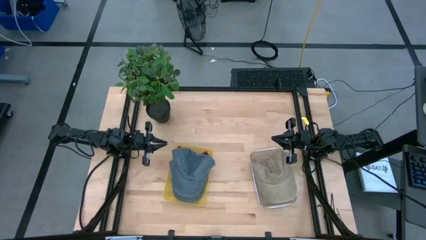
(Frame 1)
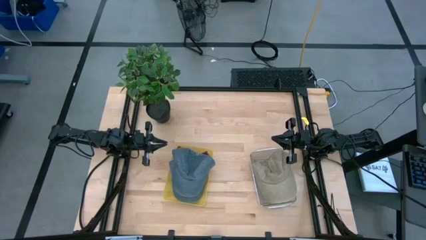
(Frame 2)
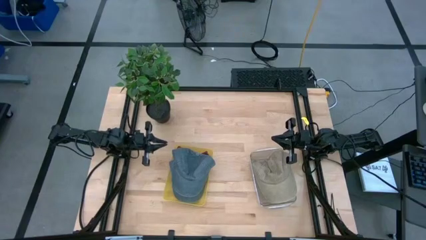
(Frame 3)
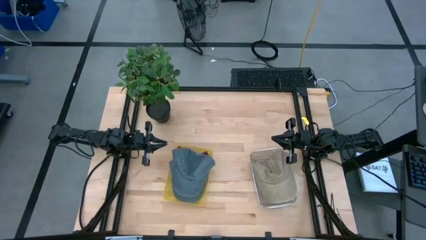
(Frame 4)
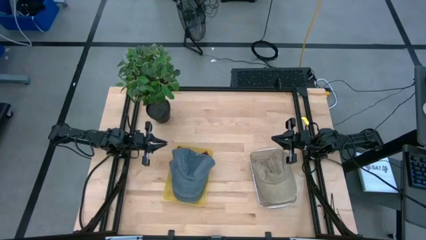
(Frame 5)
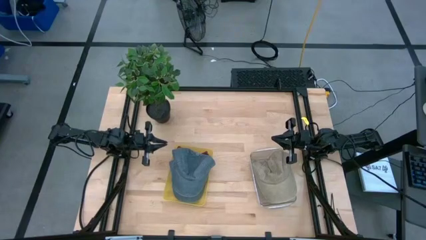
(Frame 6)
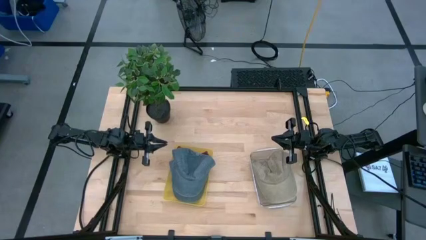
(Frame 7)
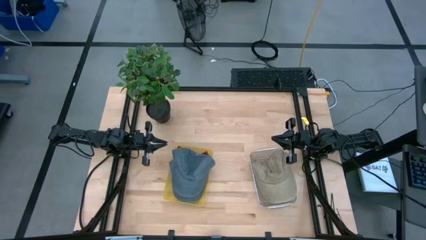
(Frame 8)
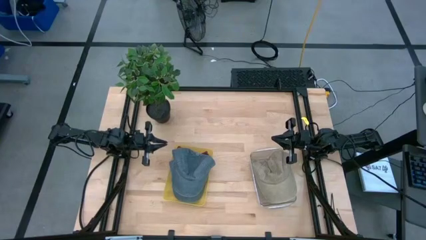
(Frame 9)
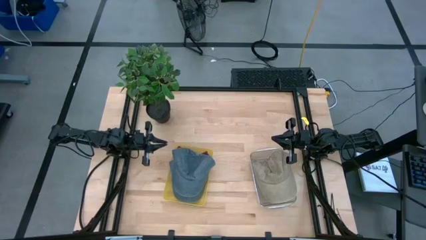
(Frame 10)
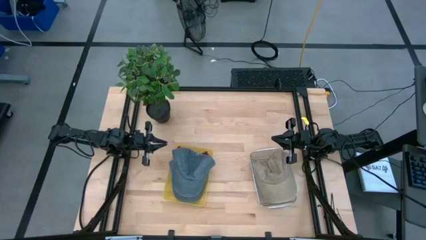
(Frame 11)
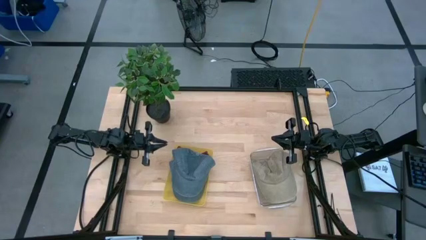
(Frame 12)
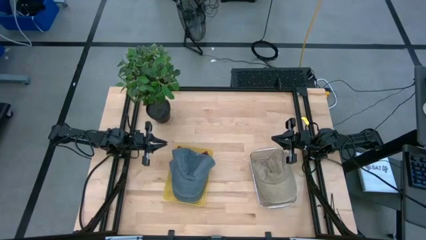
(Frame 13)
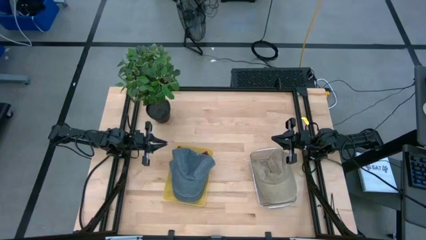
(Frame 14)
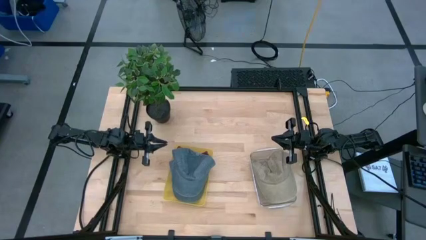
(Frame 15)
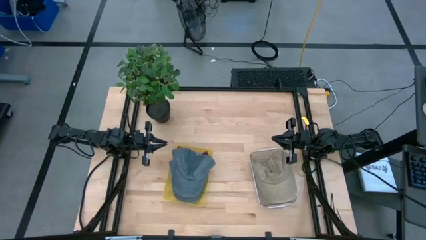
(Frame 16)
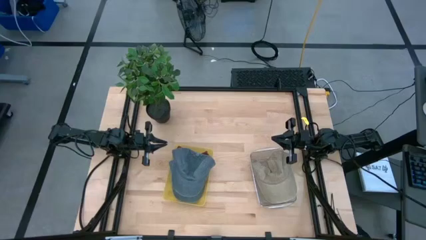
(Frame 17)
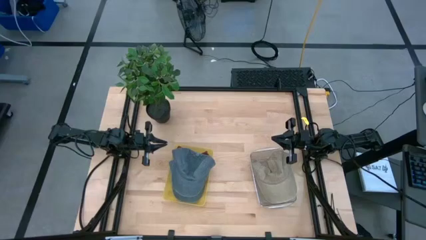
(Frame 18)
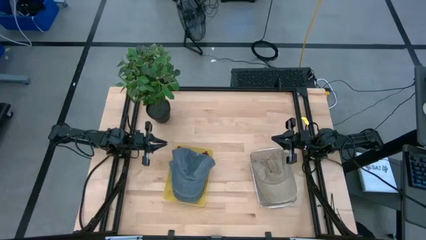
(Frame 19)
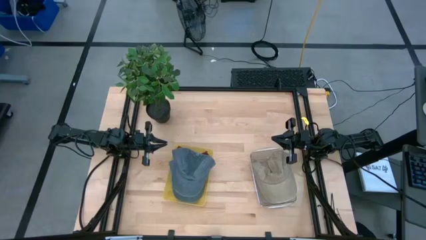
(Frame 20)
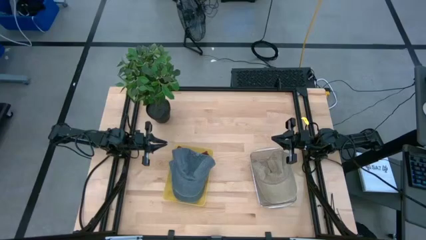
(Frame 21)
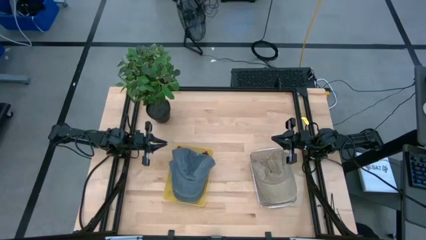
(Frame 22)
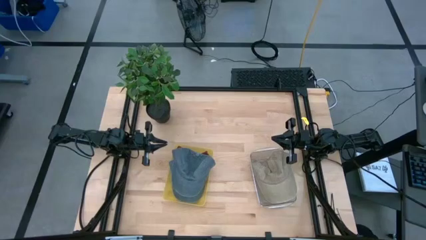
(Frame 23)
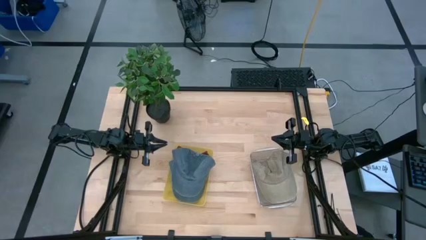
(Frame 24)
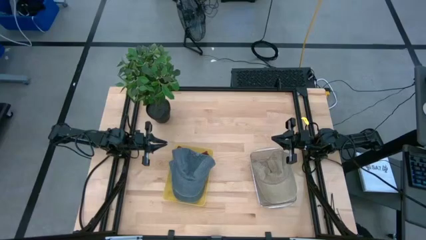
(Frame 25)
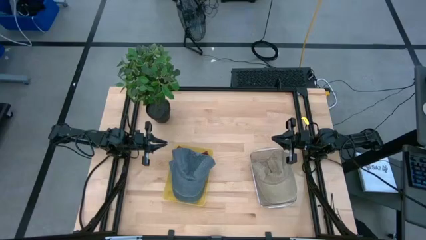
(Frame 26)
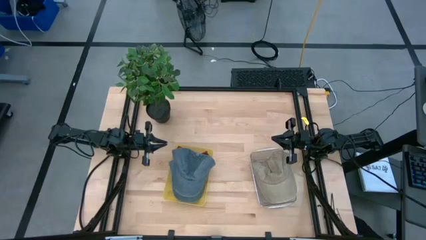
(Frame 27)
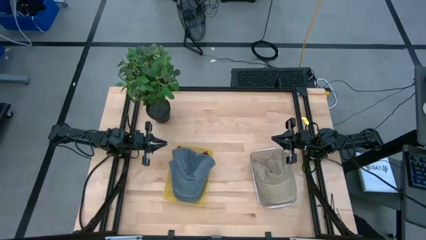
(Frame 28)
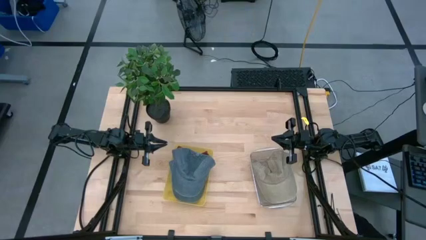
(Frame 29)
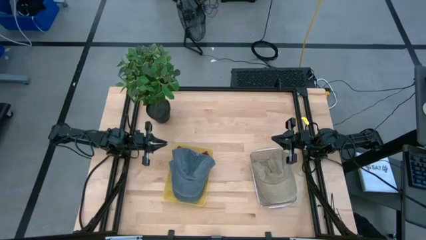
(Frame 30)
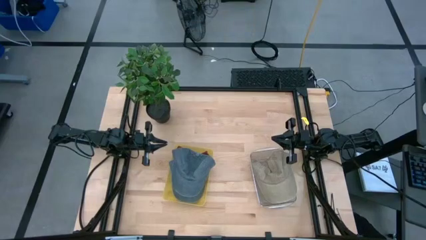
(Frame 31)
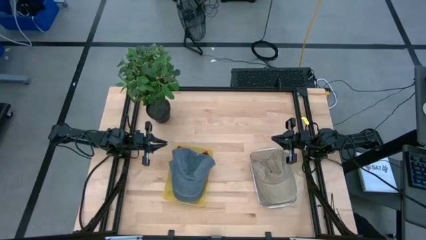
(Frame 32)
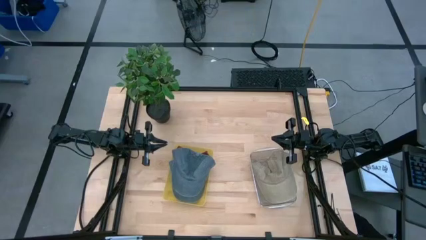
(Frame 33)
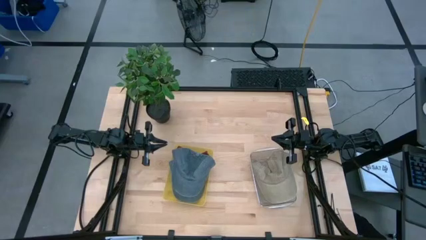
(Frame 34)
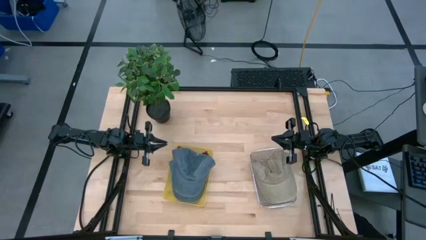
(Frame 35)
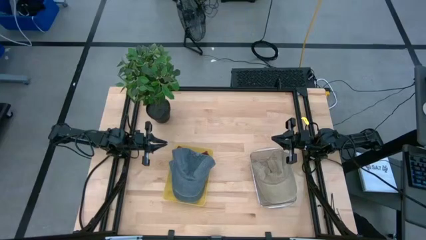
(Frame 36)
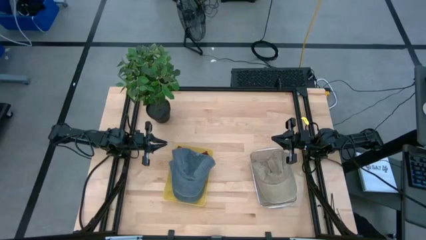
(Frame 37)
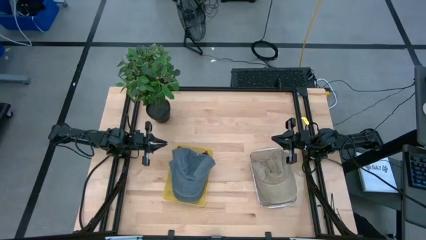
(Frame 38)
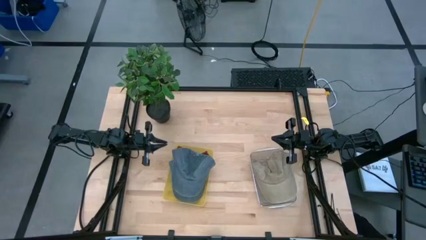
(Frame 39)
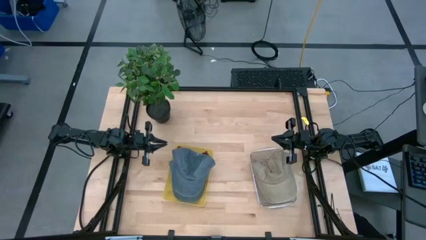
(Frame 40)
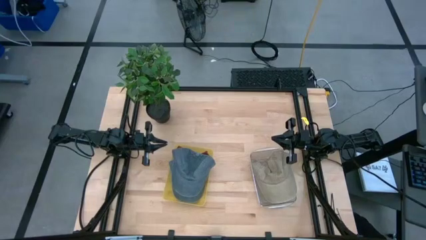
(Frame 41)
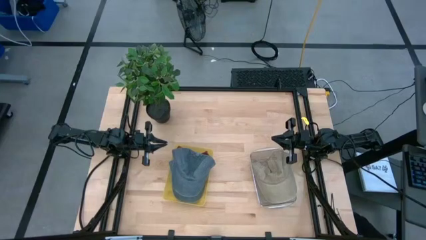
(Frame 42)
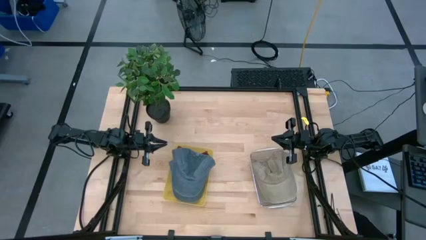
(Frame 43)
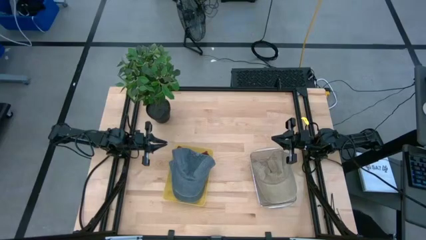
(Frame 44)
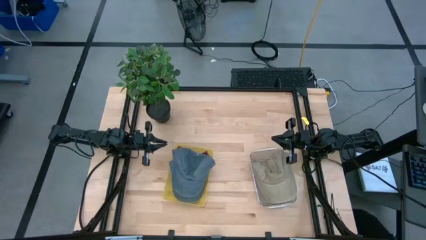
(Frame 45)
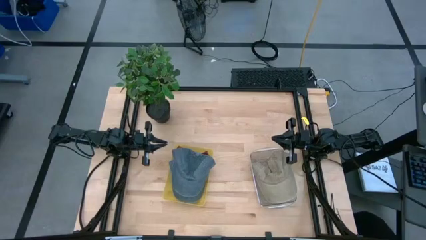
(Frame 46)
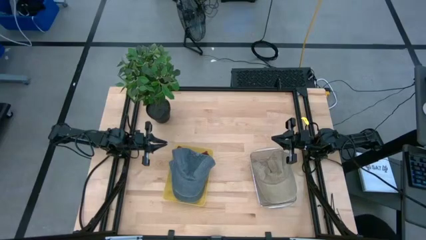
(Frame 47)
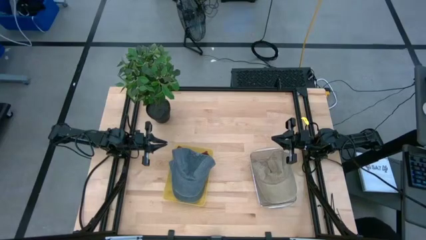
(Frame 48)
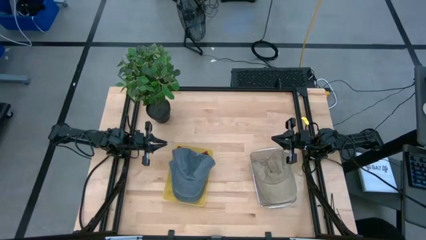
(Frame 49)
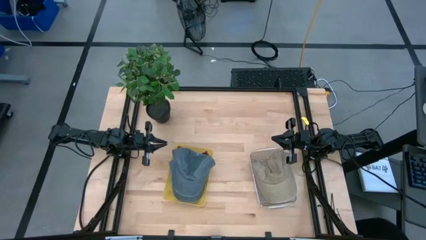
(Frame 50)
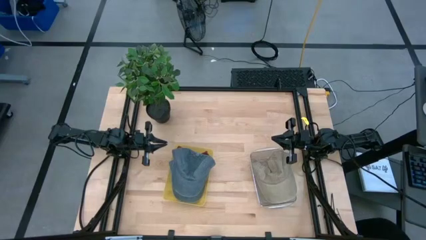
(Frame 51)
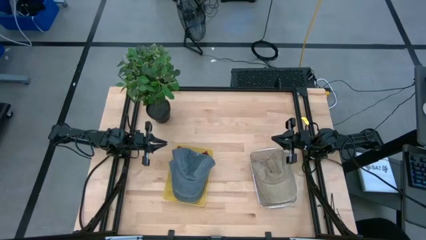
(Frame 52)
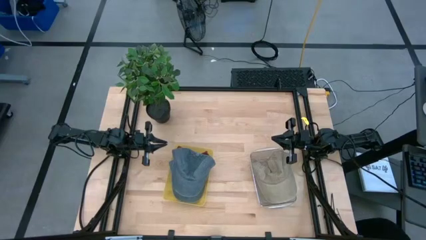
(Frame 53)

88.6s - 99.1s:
Task: Pick & Place hat
Return to Home Position
